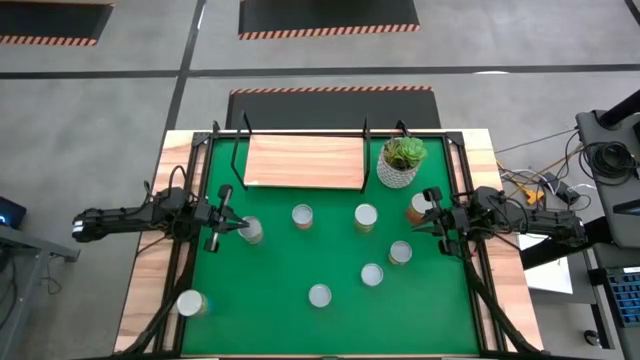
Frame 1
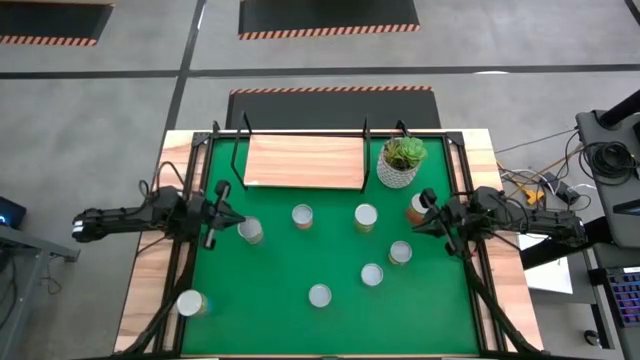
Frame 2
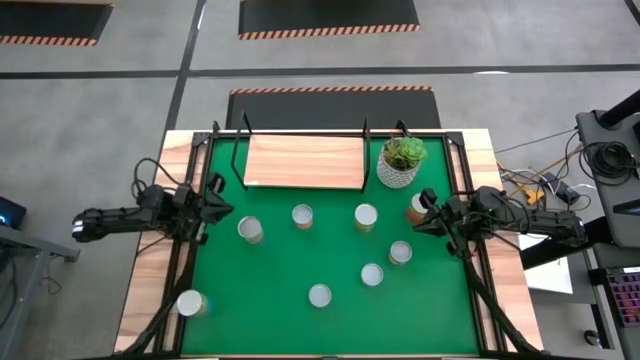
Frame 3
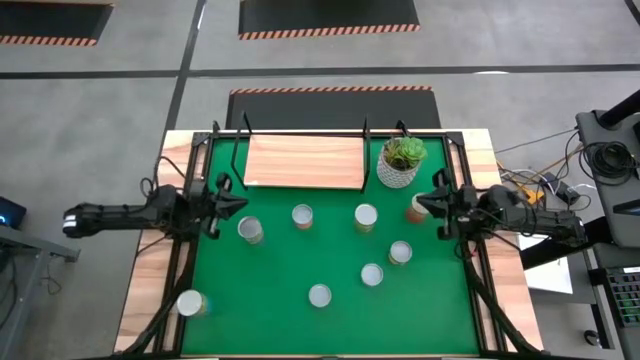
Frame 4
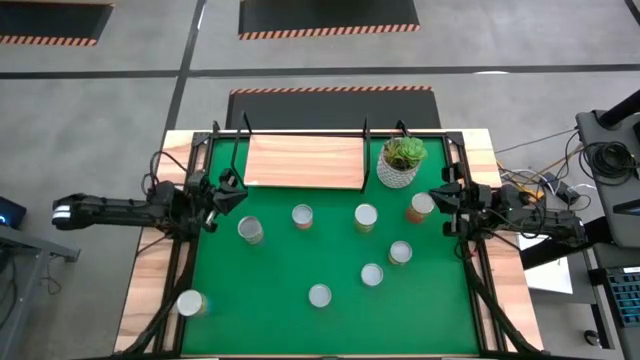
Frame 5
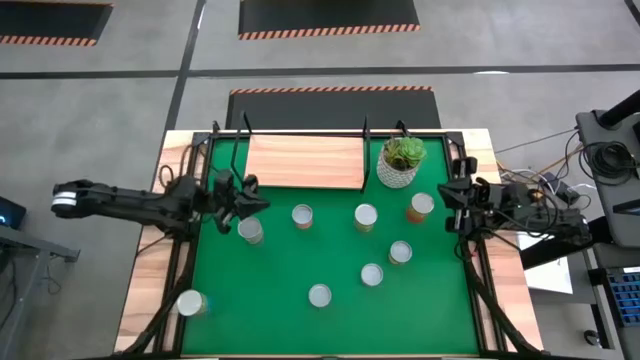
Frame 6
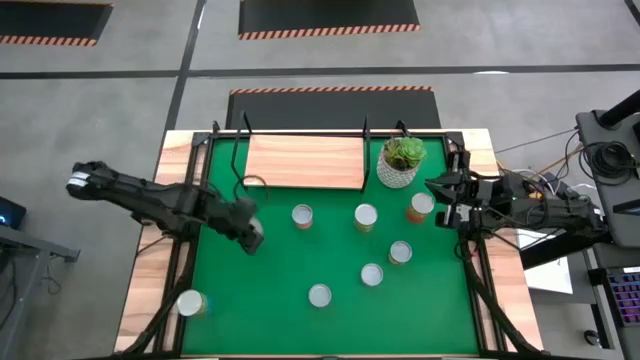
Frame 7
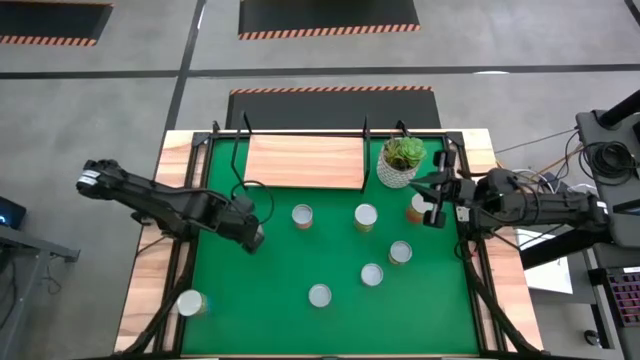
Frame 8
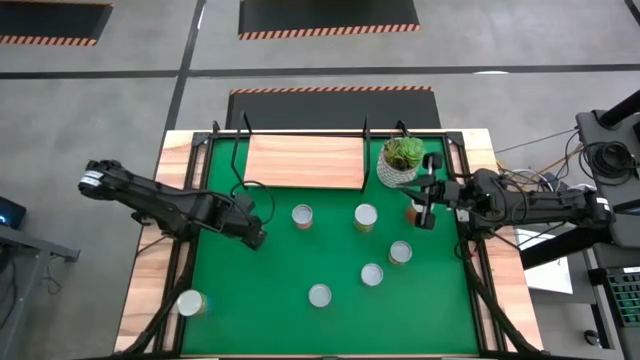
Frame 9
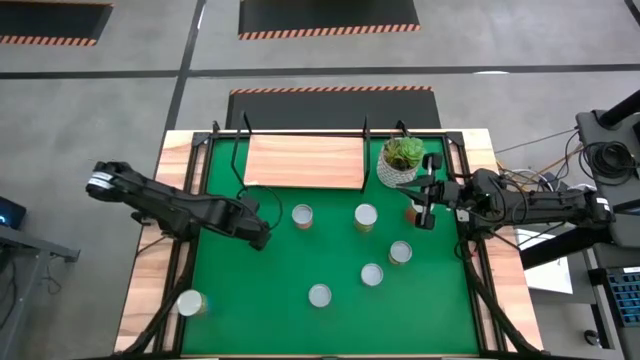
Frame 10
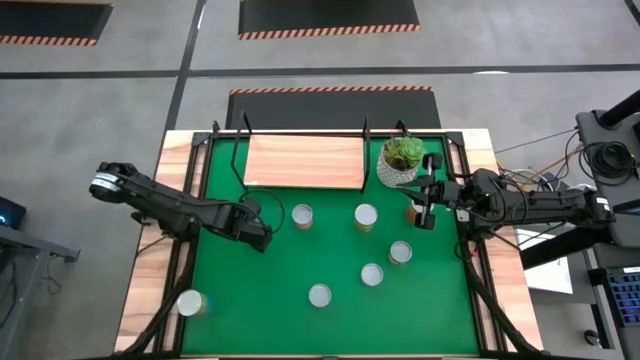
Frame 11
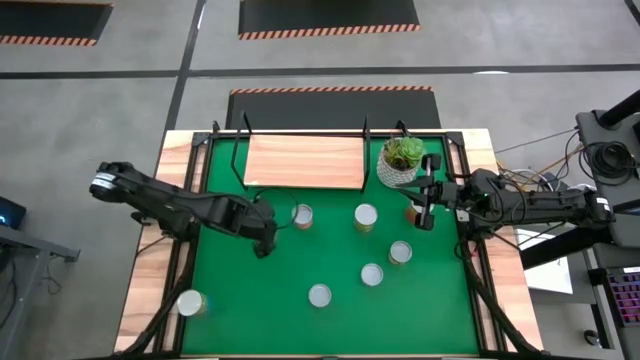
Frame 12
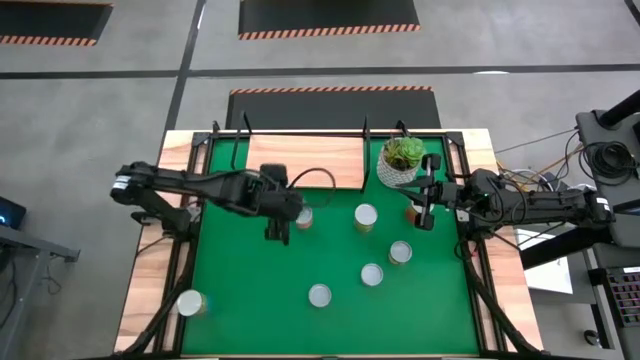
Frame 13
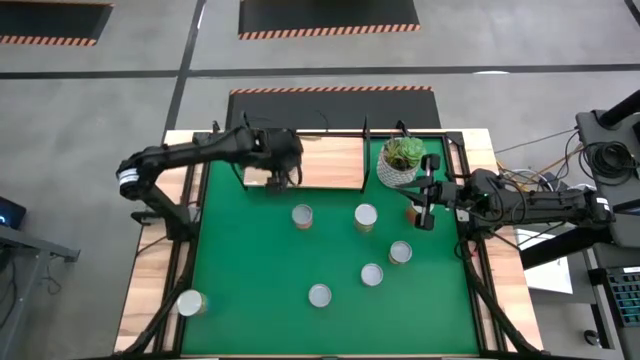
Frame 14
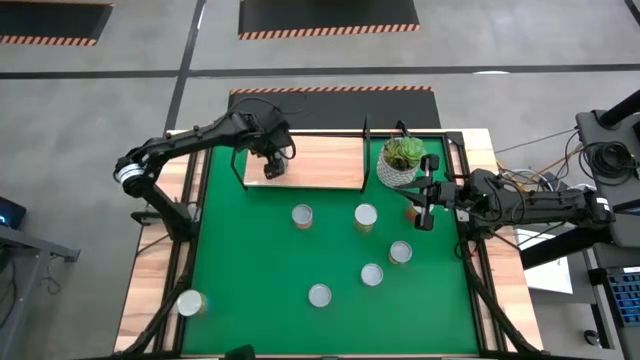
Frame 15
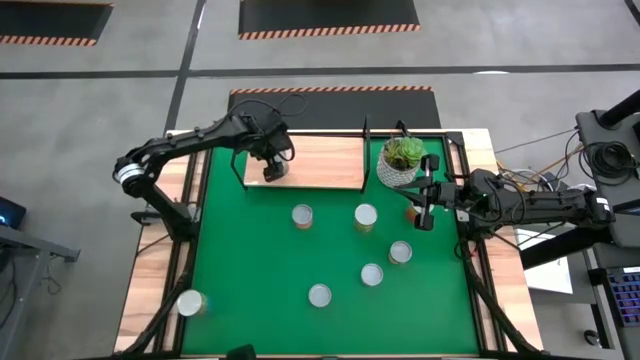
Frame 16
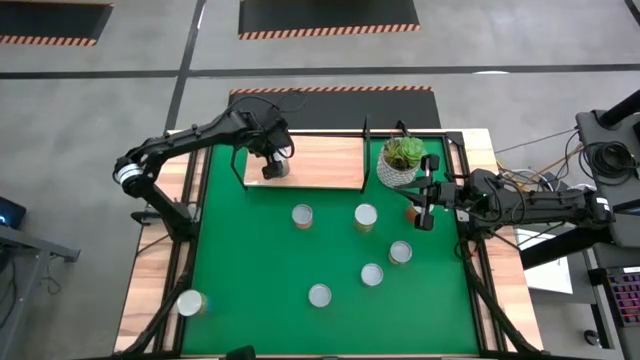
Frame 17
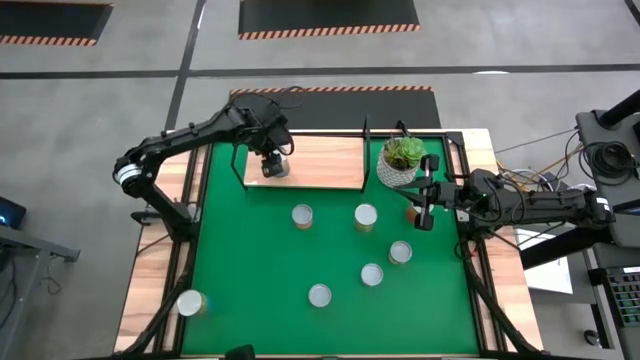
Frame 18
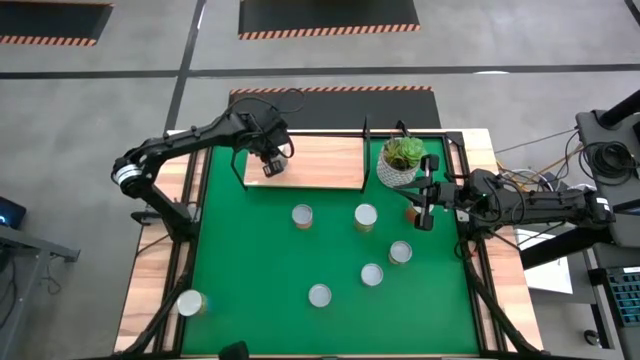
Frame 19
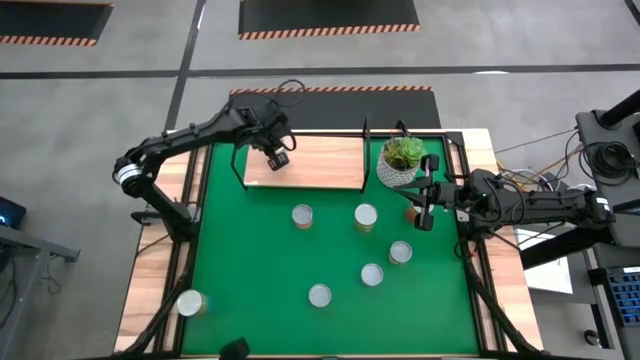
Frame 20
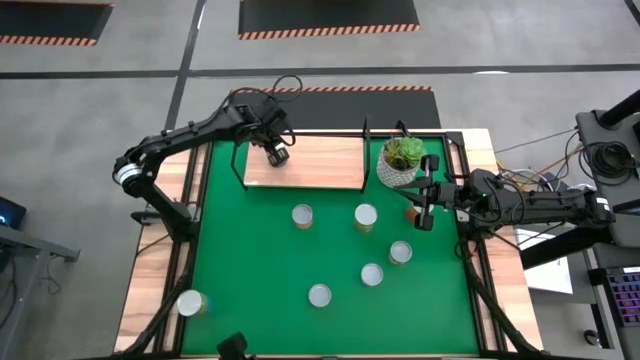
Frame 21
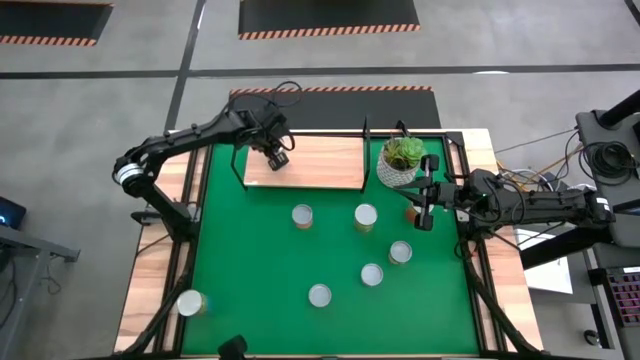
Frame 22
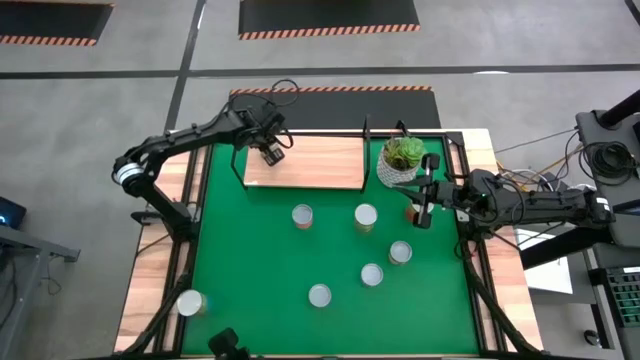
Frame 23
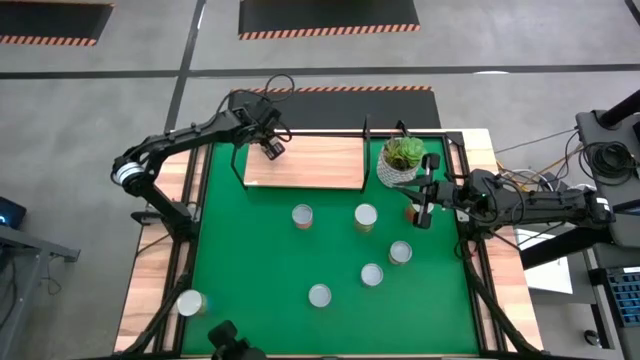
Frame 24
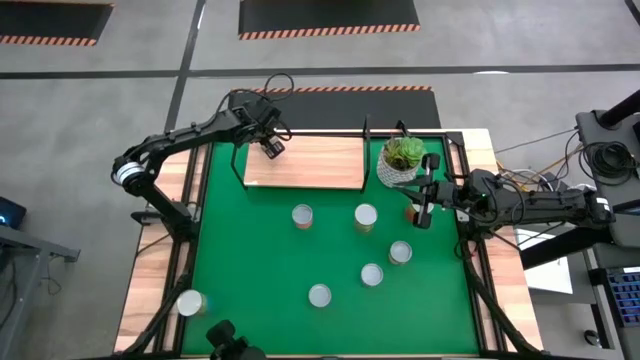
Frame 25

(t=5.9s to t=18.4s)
Task: Pick and place cans onto a shelf
Put the canned peas on the shelf

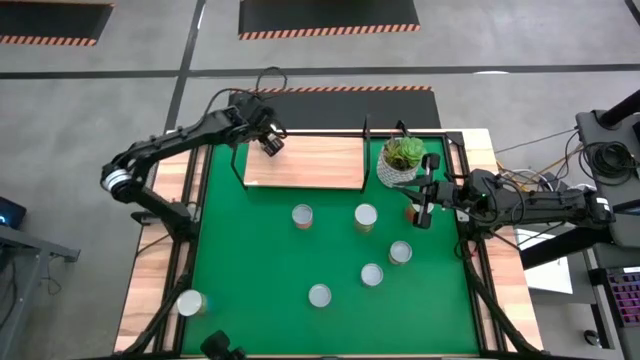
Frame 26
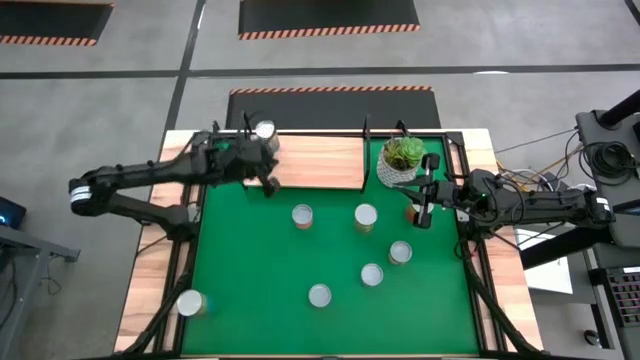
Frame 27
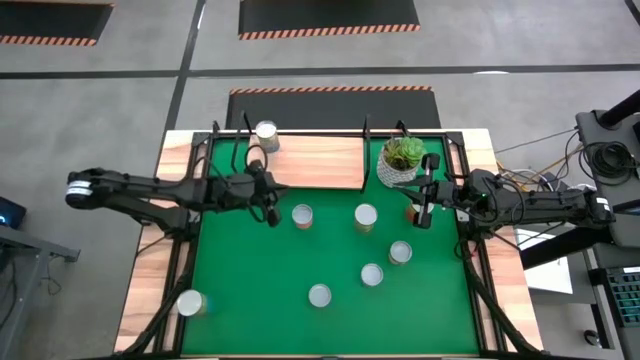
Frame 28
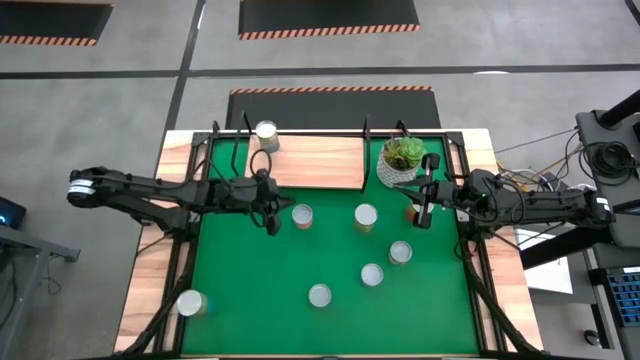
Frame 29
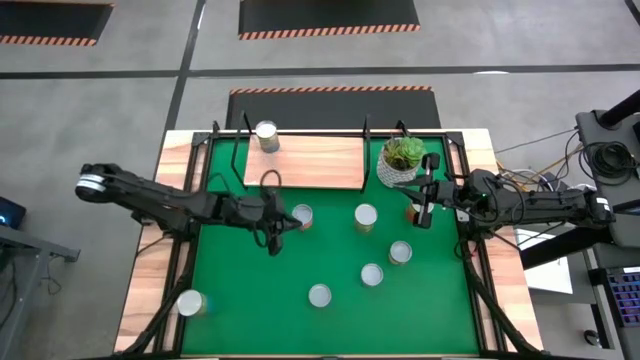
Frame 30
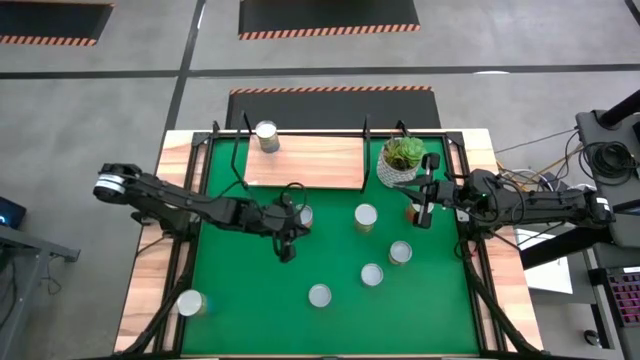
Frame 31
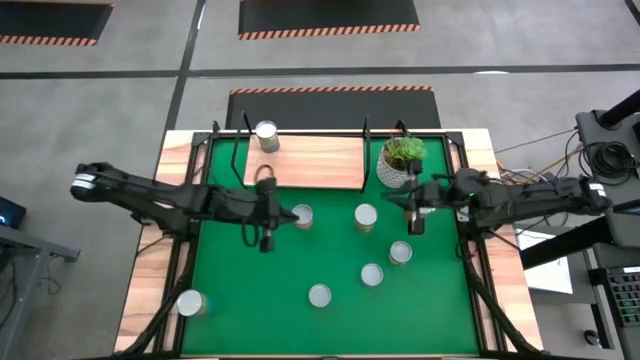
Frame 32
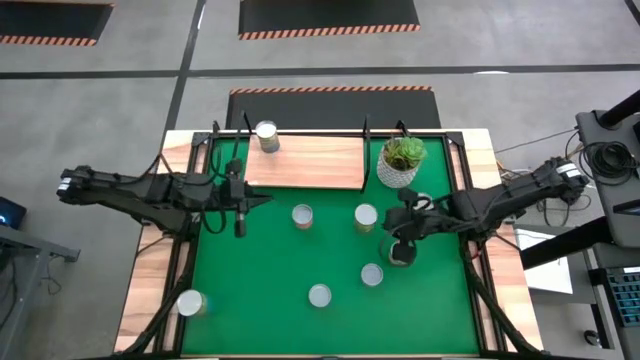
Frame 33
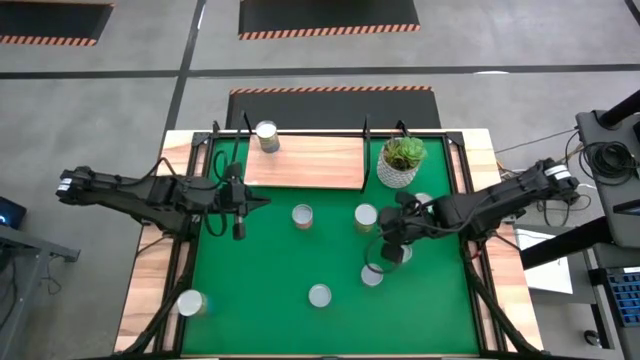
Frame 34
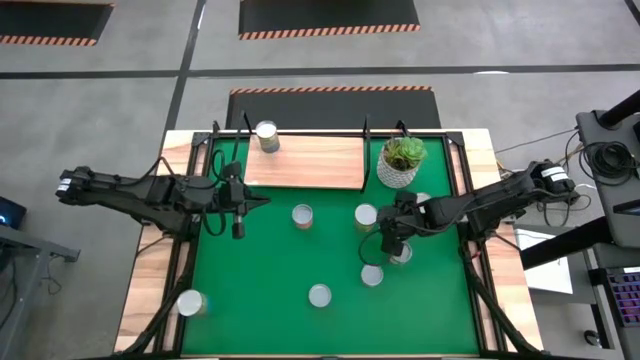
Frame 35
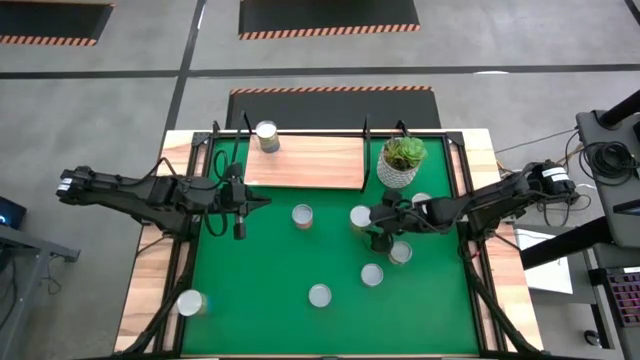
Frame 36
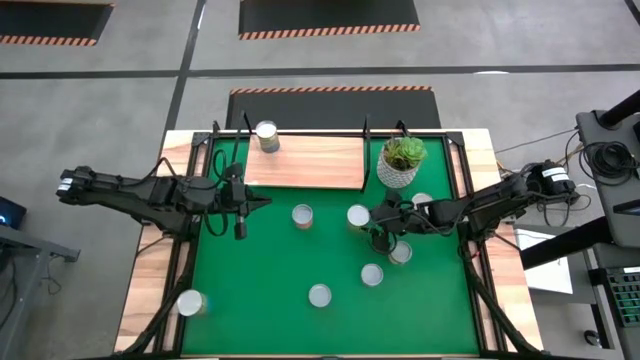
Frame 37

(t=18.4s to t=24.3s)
Put the canned pears on the shelf

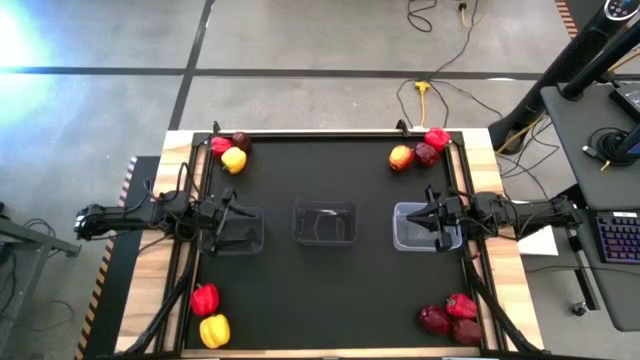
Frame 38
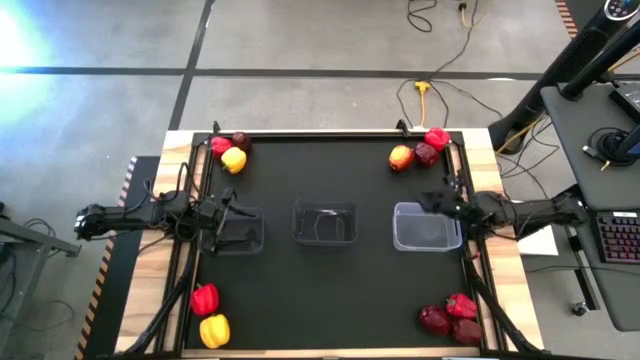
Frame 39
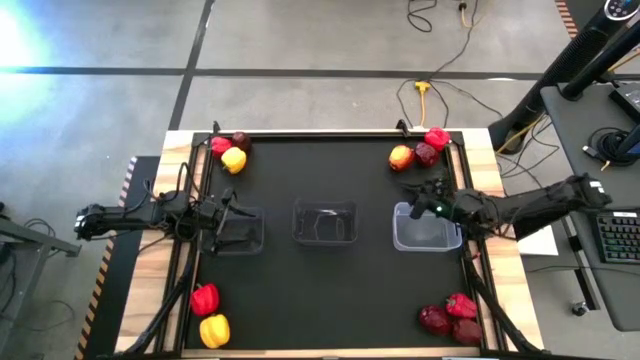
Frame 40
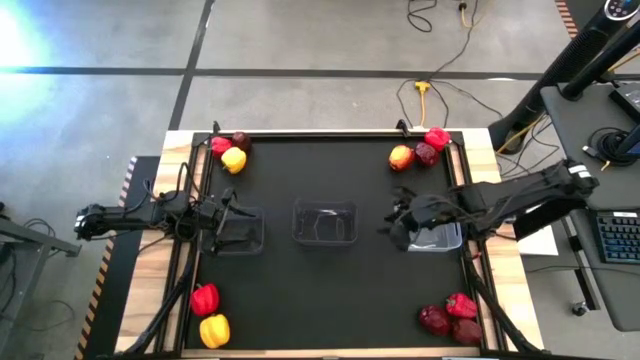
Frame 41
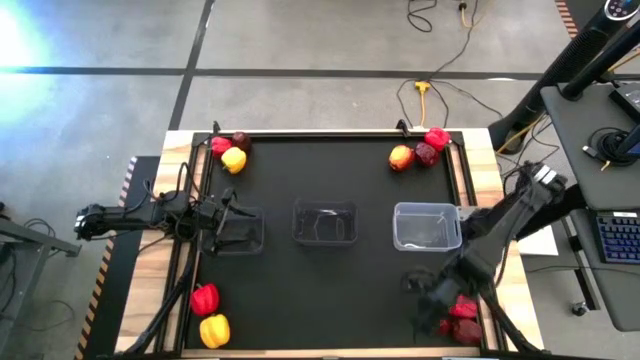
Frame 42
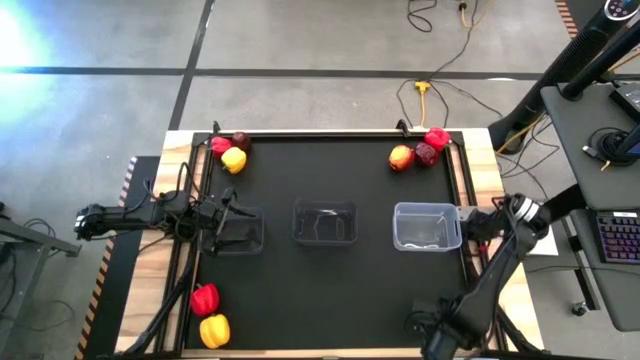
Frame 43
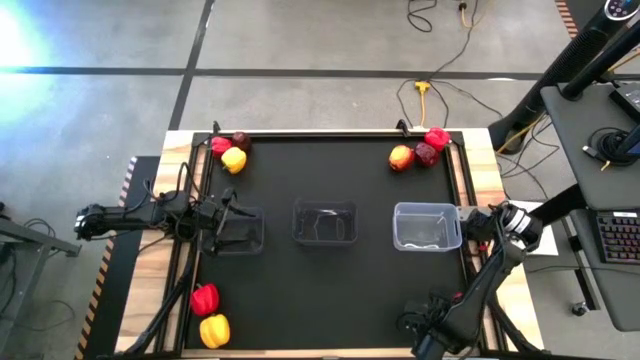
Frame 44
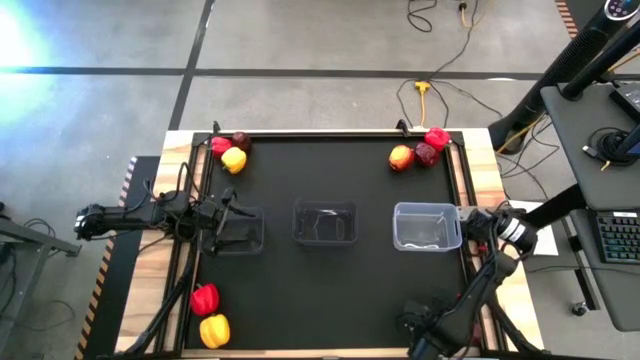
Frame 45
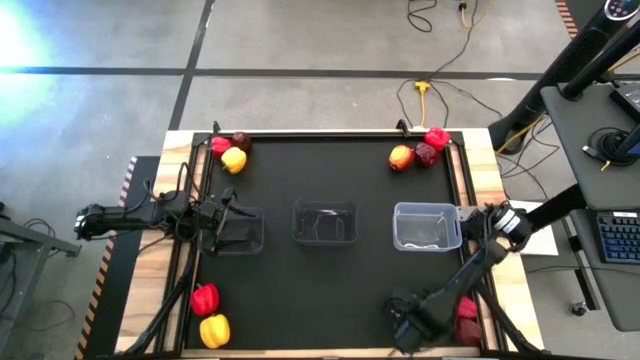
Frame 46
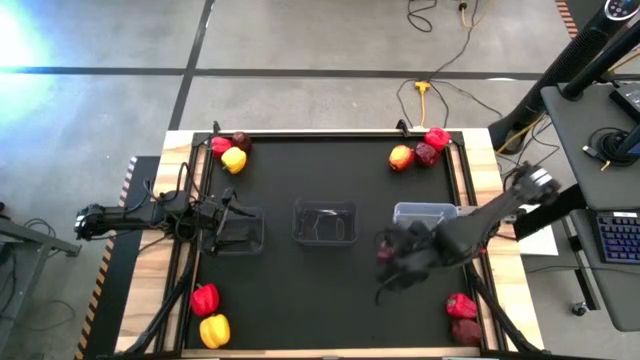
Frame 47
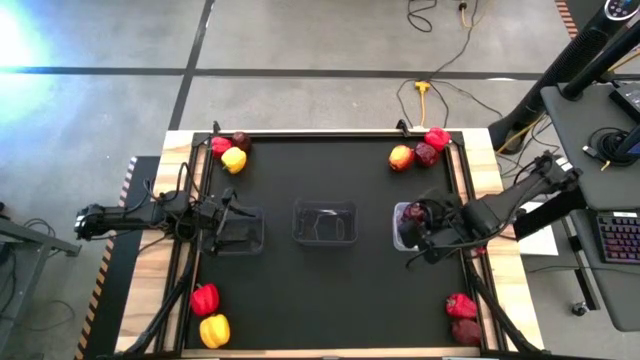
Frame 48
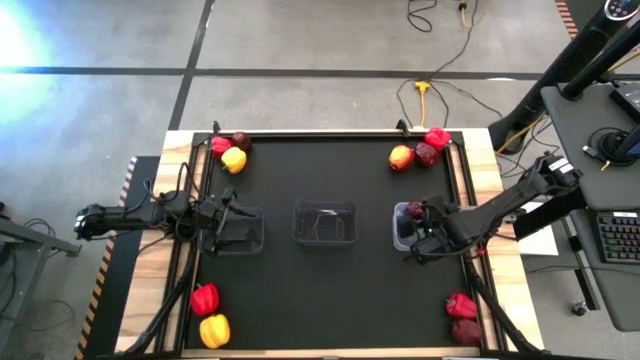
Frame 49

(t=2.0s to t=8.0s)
Task: Sort produce into baskets
Put the red apple into the transparent bin
